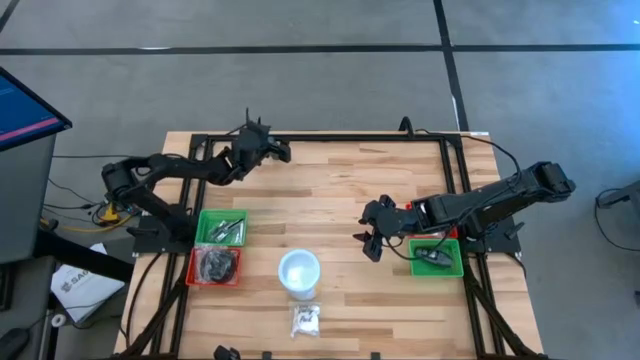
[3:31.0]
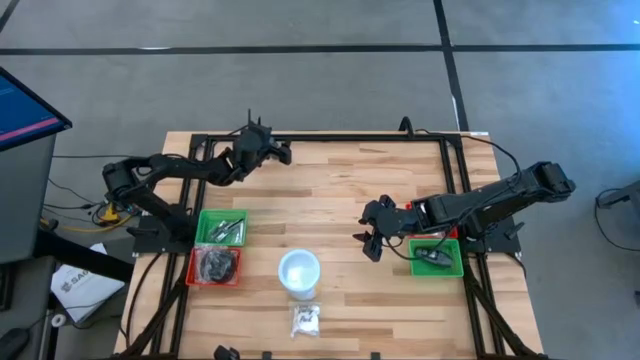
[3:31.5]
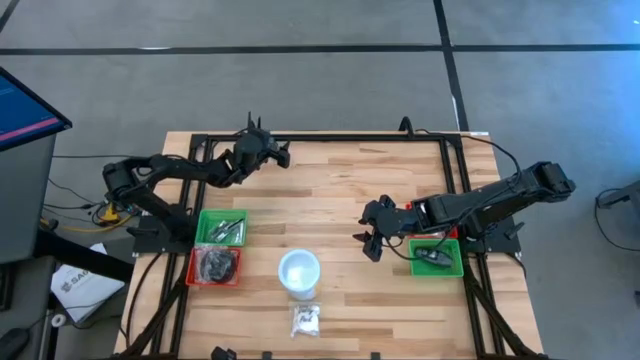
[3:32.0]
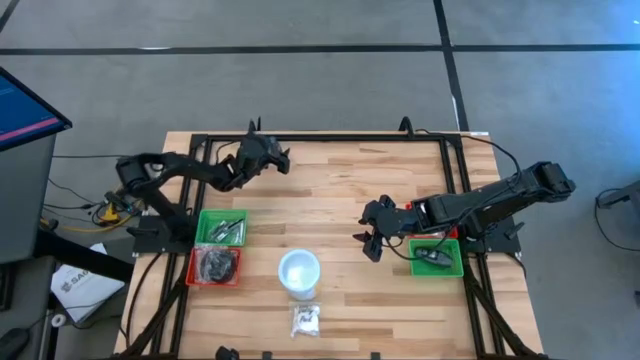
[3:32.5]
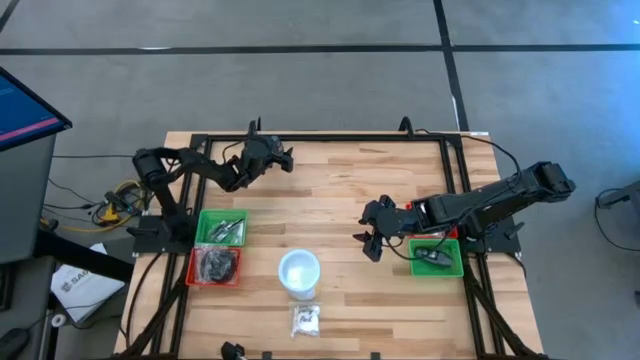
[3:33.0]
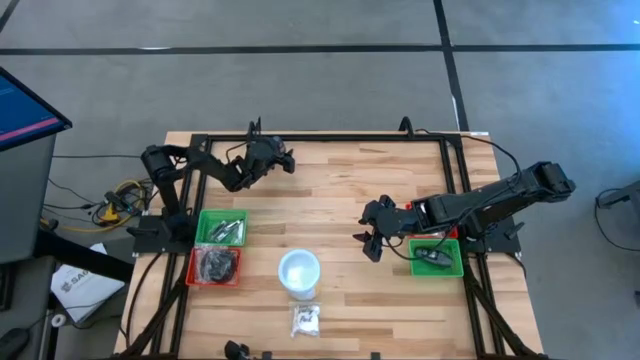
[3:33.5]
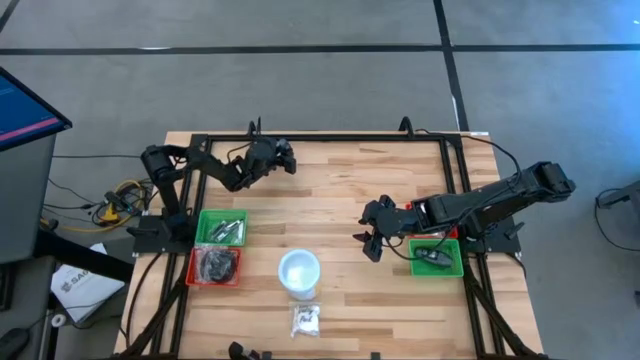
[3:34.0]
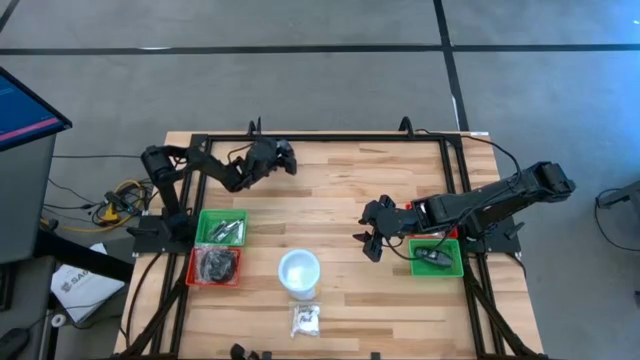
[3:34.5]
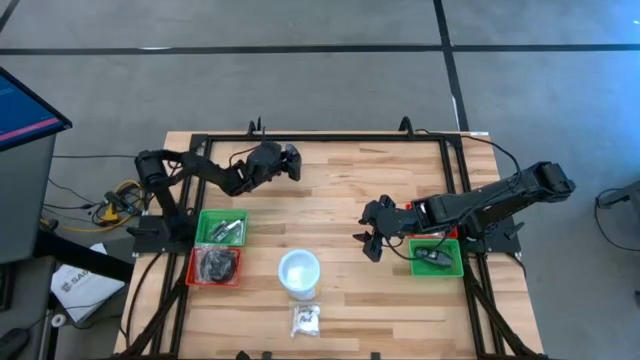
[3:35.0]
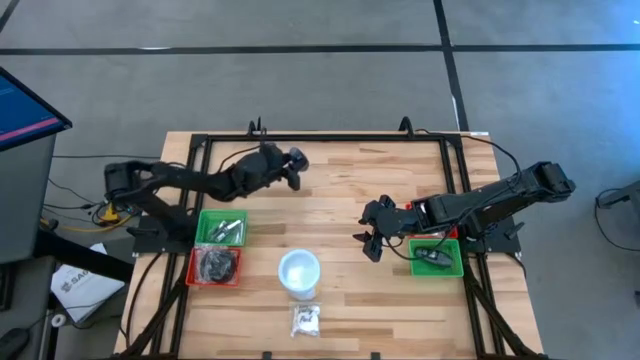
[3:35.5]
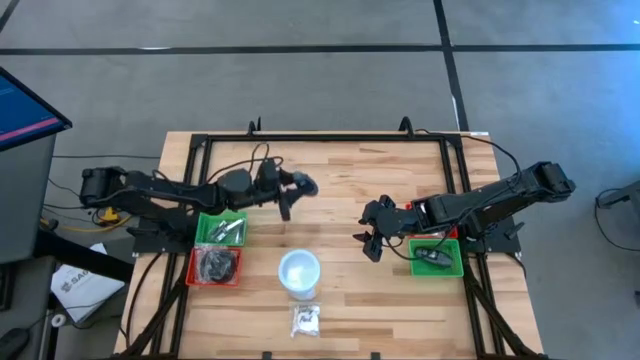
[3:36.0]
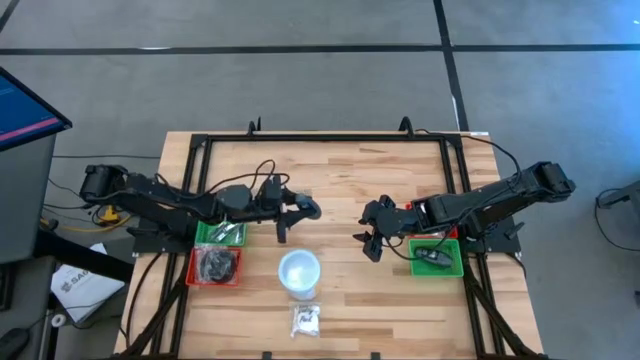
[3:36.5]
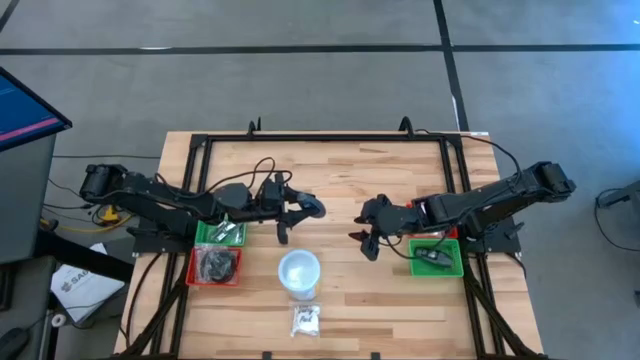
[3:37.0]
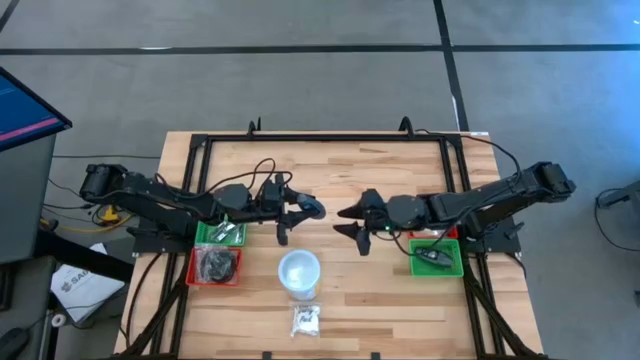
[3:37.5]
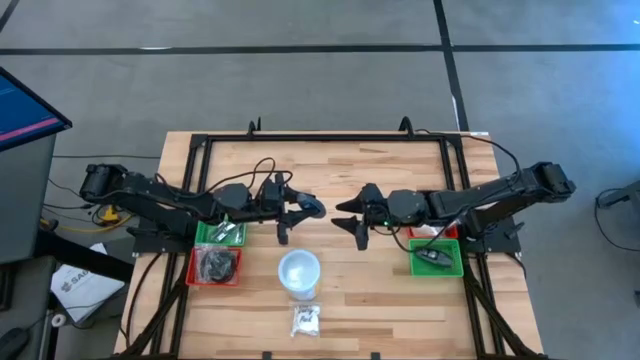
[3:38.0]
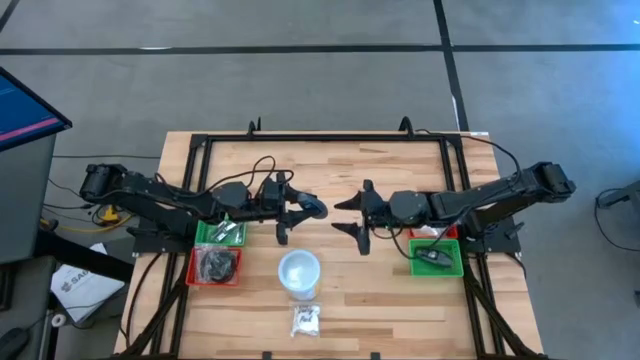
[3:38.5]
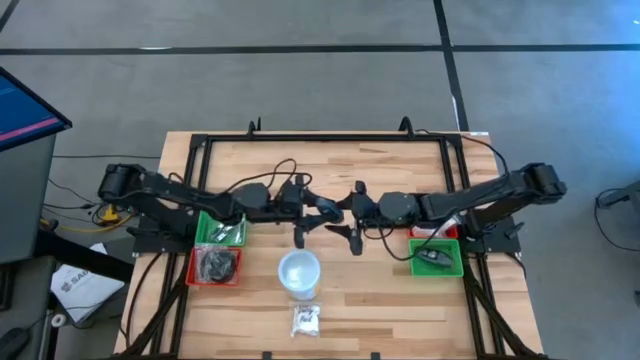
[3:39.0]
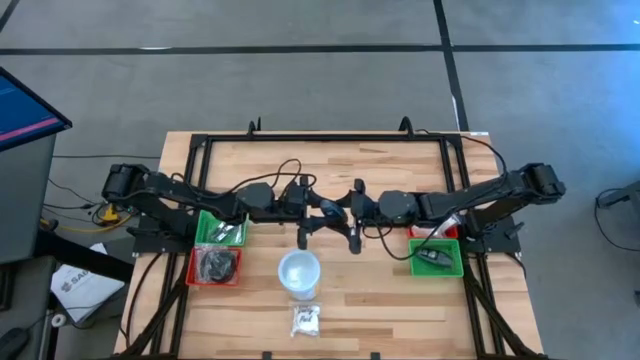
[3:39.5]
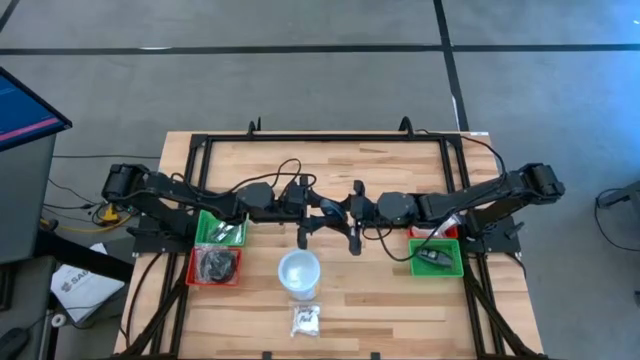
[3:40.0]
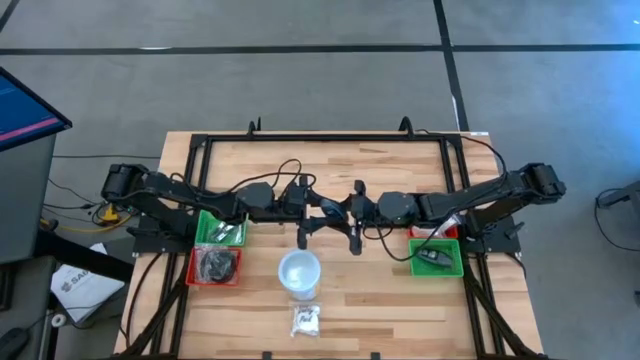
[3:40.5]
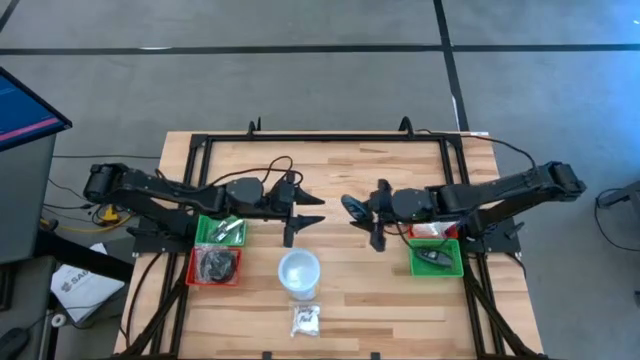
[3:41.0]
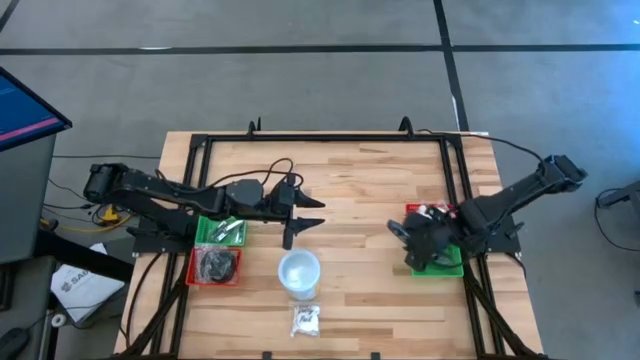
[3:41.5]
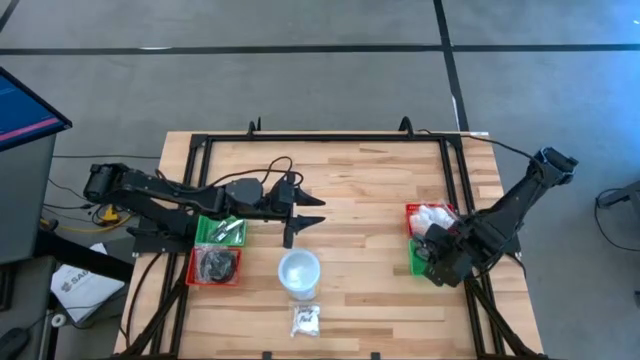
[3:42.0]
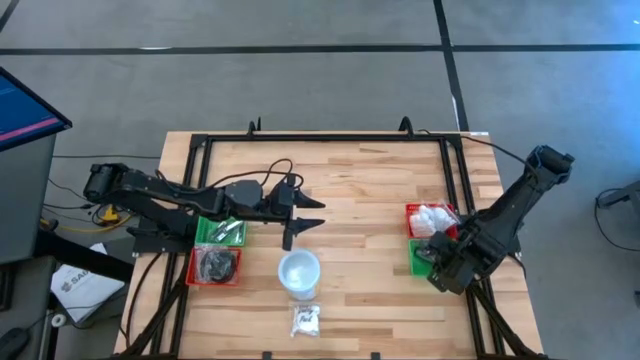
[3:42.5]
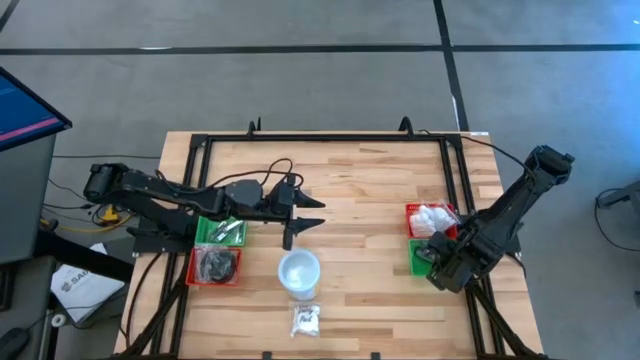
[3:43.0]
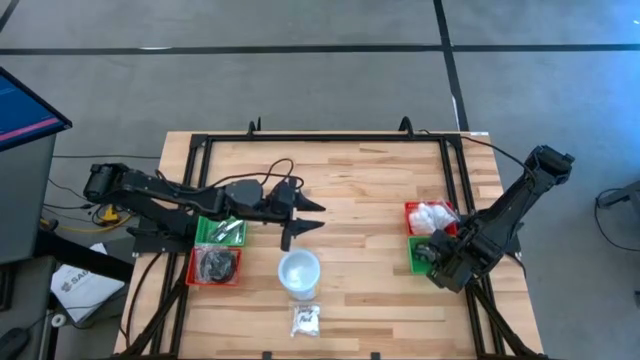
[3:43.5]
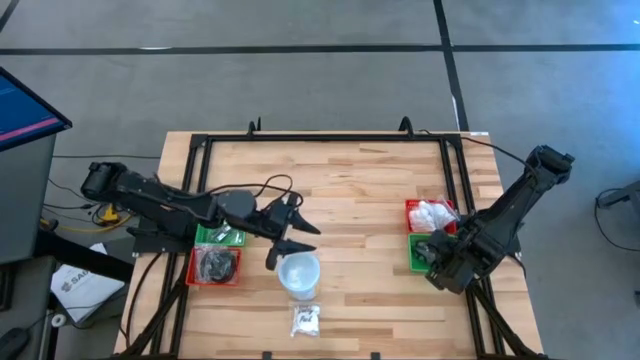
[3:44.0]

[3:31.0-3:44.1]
Task: Pick & Place Travel size toiletries
Put the bottom gray deodorant into the right green bin

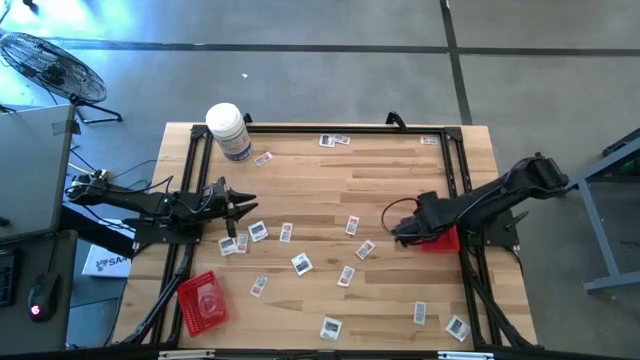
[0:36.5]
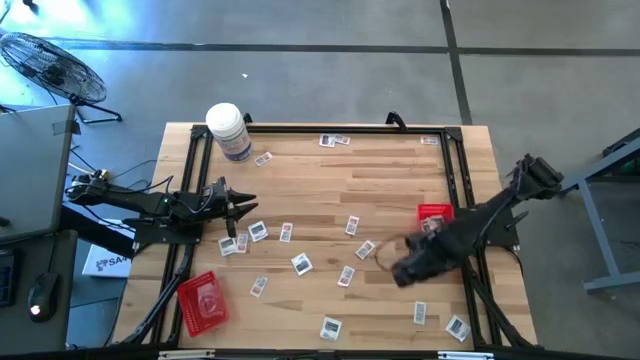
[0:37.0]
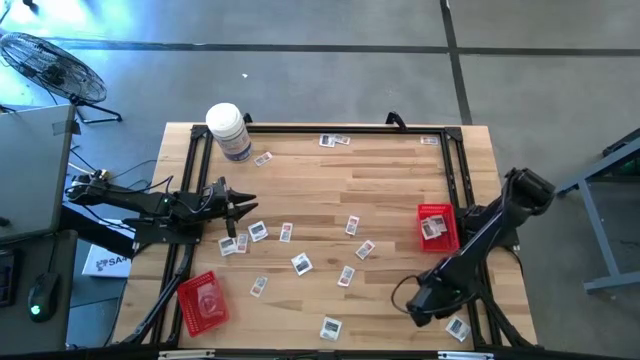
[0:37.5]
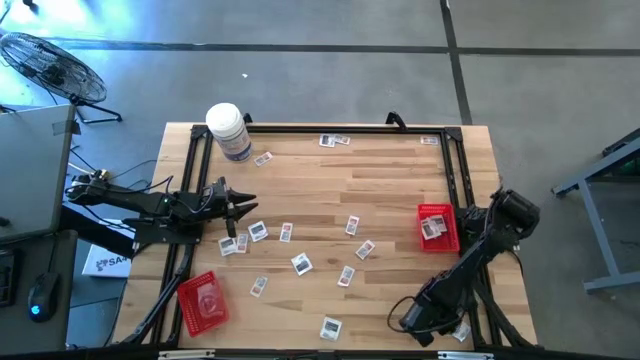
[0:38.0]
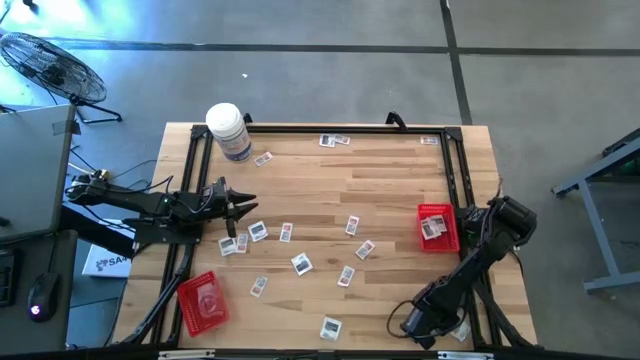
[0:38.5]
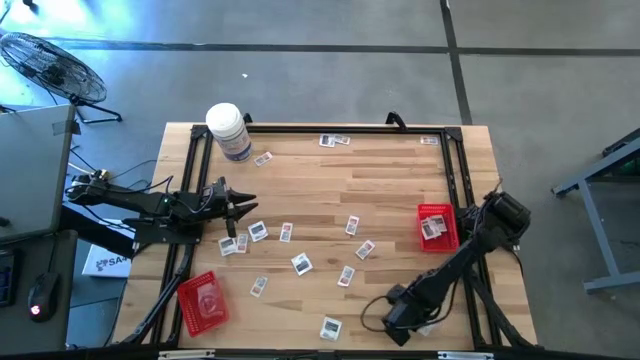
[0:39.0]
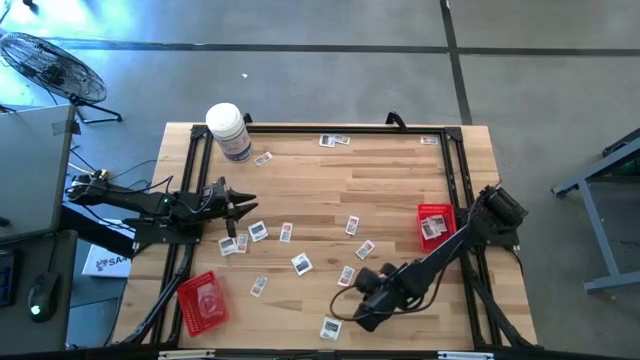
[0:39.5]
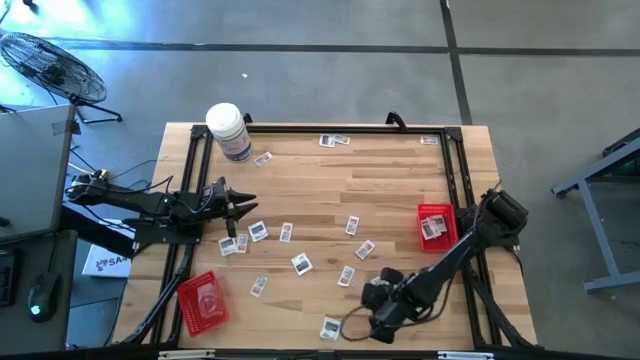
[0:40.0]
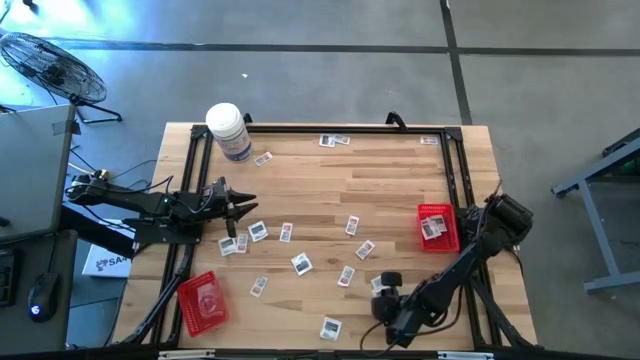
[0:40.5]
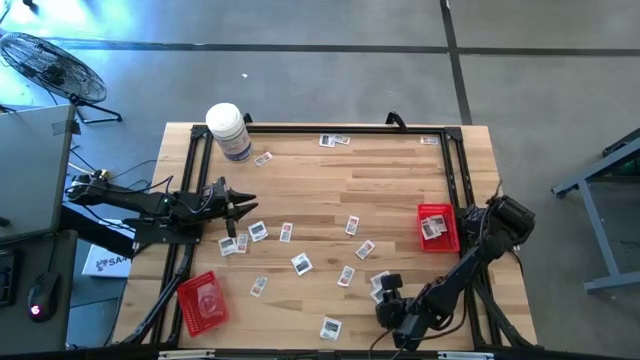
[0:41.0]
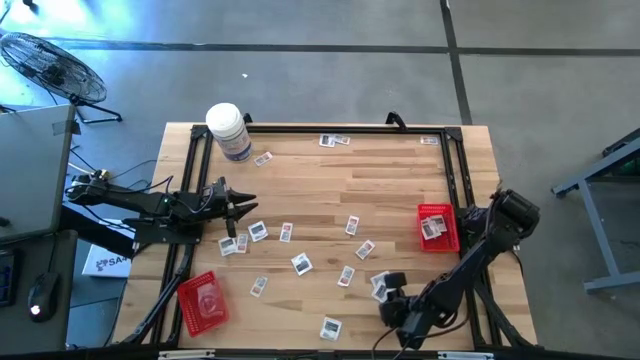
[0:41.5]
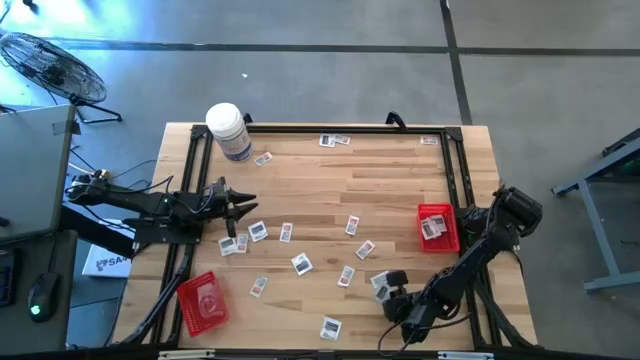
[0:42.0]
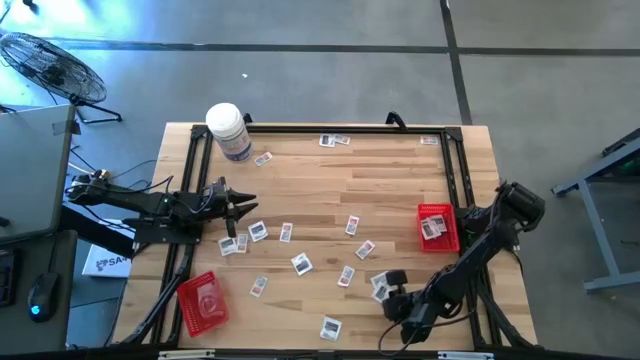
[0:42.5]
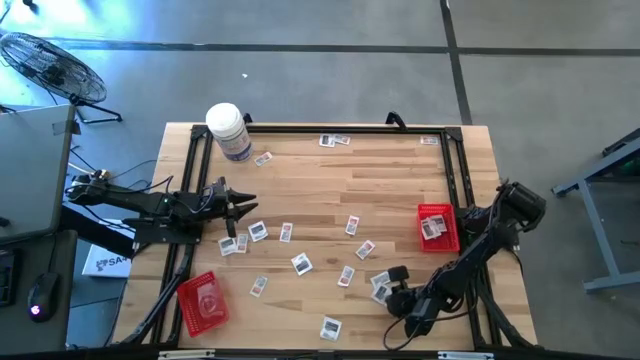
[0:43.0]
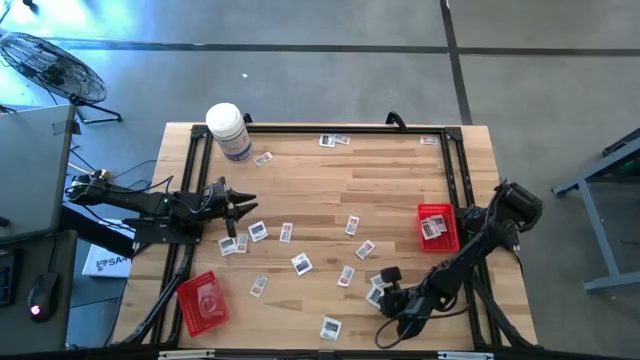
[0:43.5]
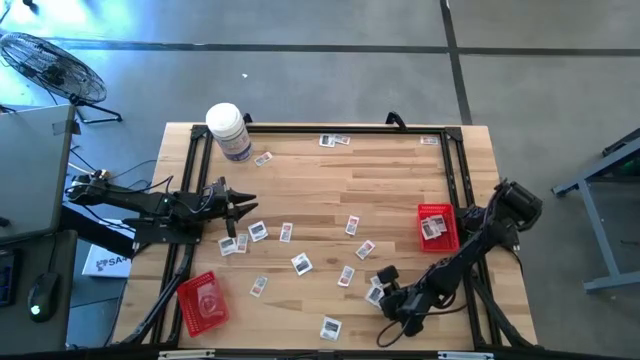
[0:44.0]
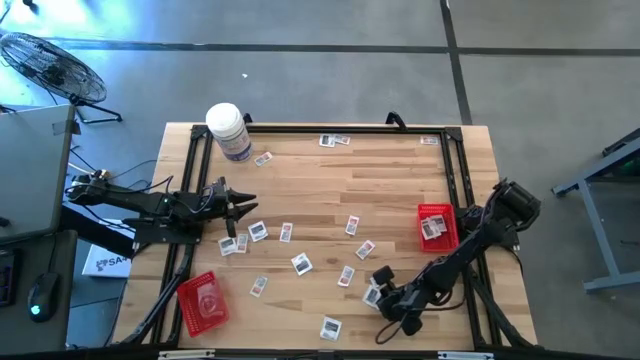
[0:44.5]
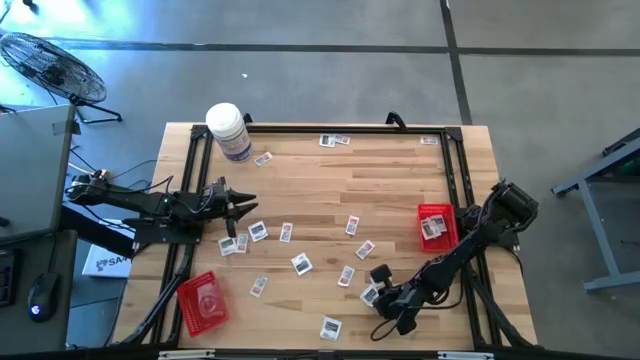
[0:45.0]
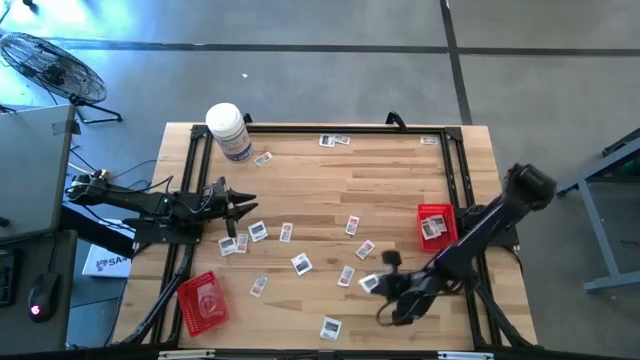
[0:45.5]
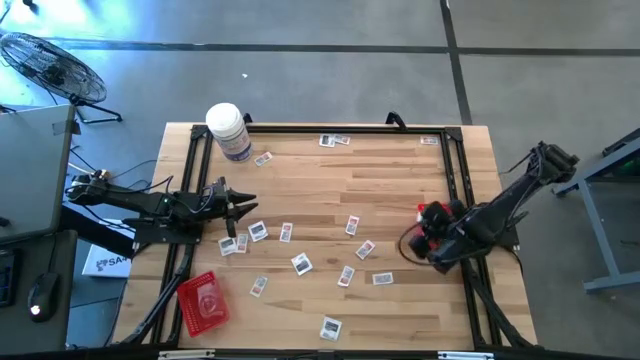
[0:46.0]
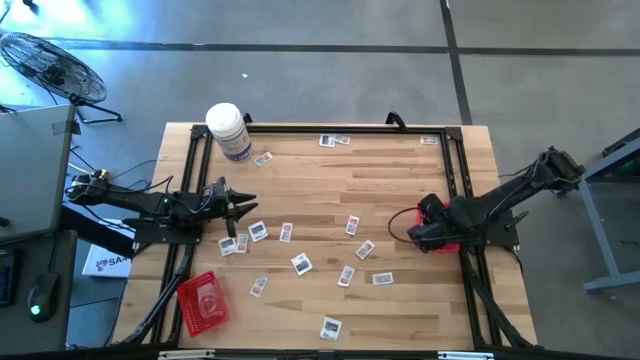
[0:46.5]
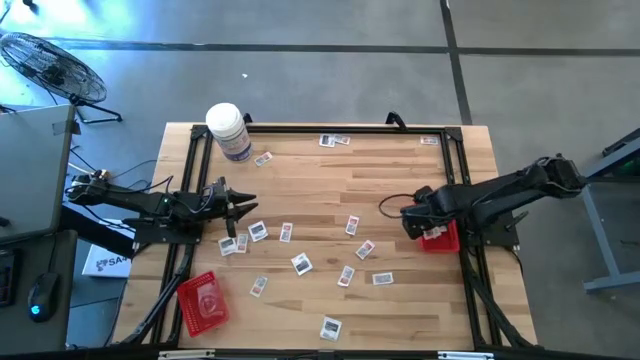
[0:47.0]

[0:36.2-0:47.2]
Task: Pick & Place First Aid Supplies
Put the towelette pack into the right red bin
